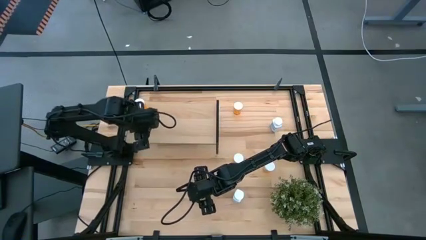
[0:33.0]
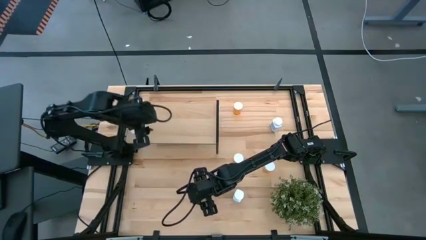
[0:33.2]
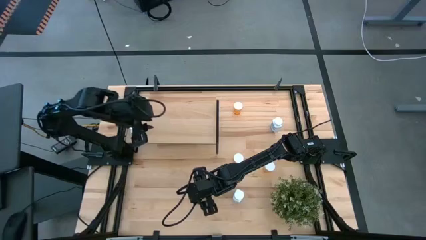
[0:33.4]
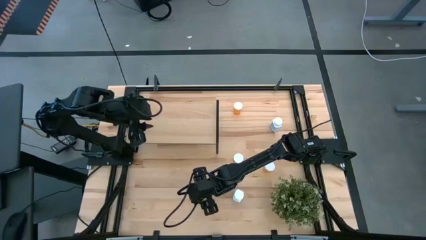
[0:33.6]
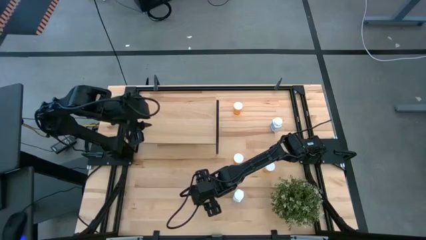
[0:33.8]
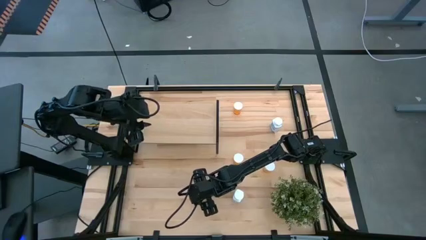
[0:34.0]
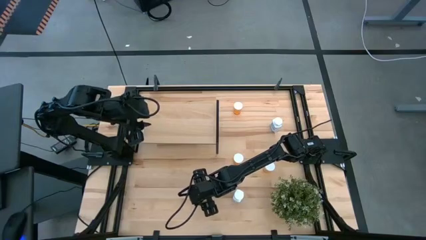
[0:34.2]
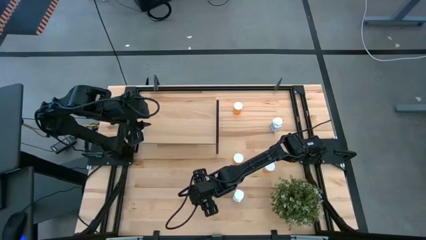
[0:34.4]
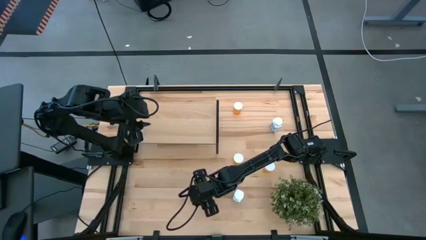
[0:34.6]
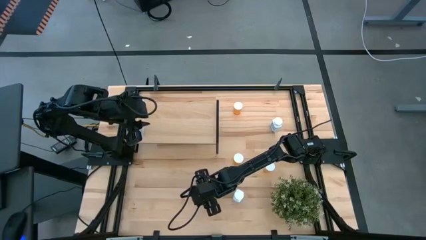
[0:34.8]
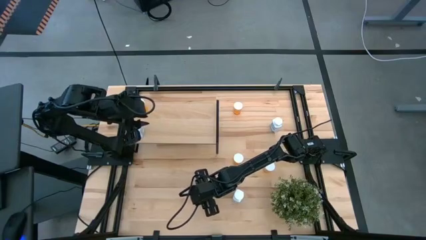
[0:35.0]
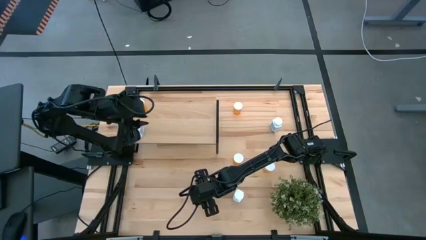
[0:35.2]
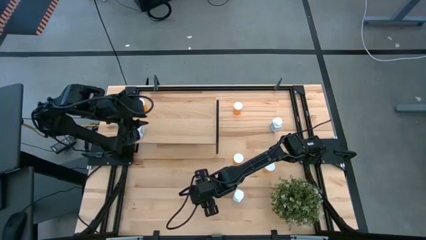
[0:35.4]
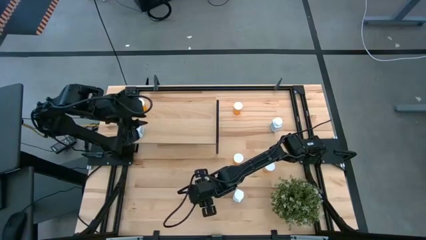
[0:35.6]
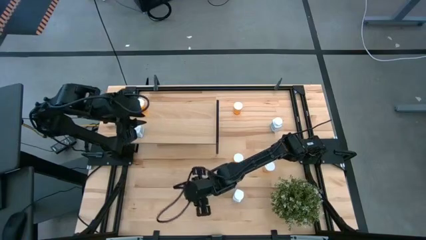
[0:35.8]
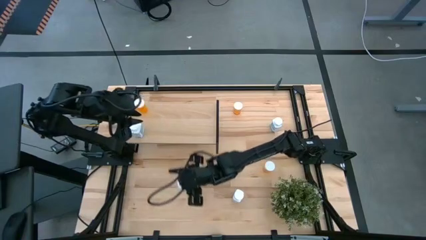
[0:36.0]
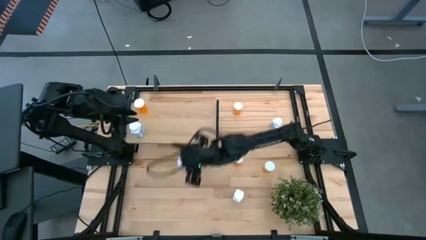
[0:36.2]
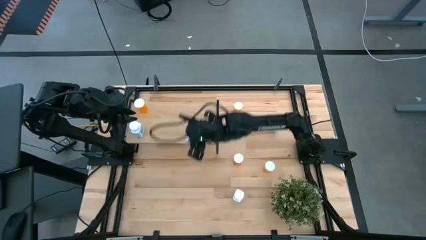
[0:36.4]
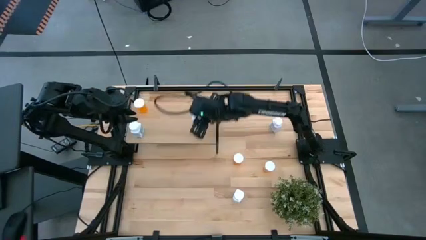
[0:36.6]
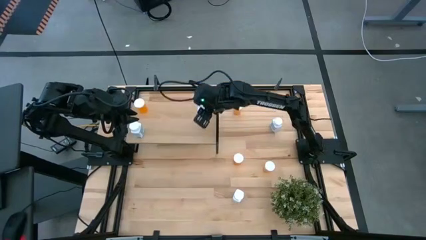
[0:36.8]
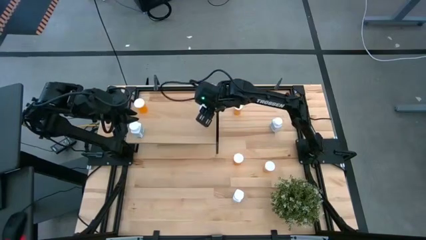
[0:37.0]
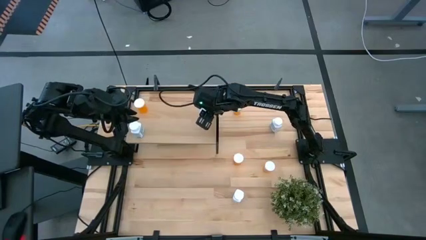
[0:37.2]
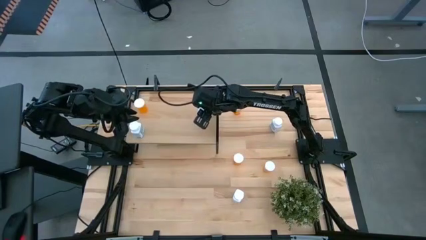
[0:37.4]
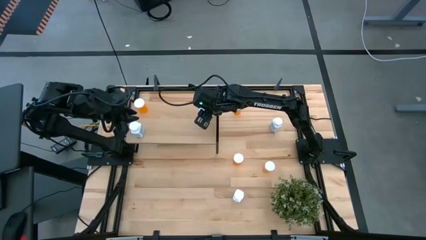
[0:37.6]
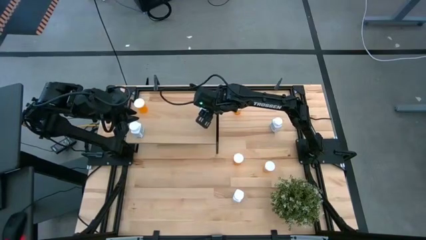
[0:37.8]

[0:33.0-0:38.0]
Task: Pick and place medicine bottles onto shelf by color
Put the white pill bottle on the shelf

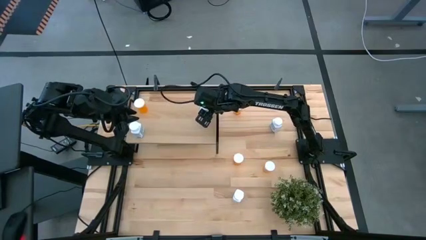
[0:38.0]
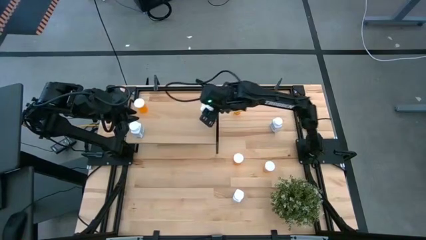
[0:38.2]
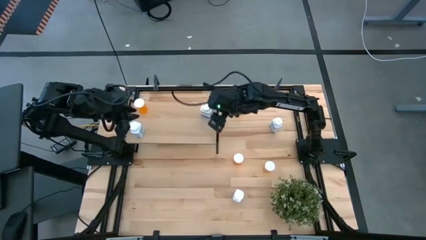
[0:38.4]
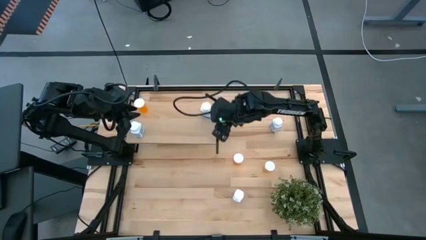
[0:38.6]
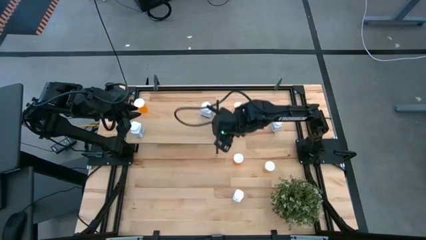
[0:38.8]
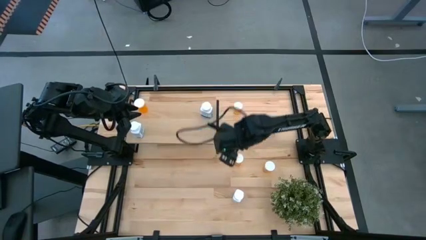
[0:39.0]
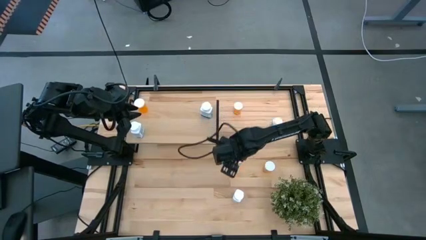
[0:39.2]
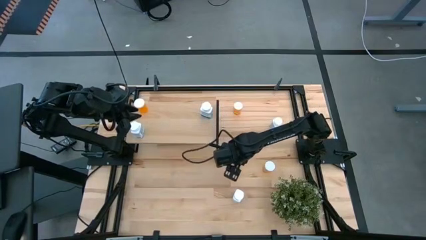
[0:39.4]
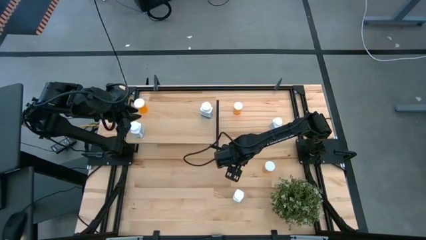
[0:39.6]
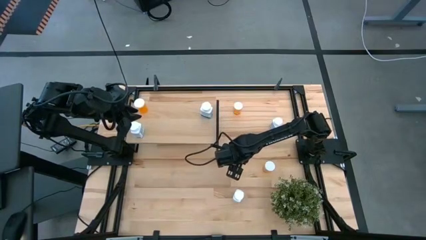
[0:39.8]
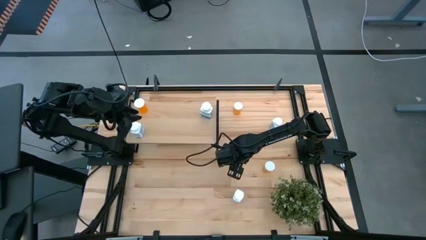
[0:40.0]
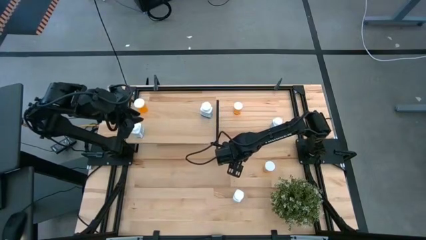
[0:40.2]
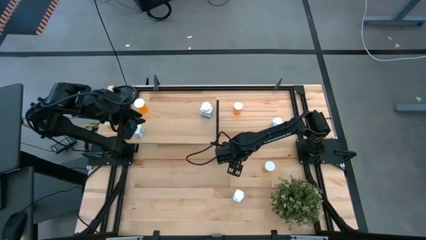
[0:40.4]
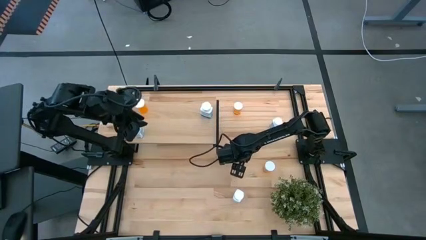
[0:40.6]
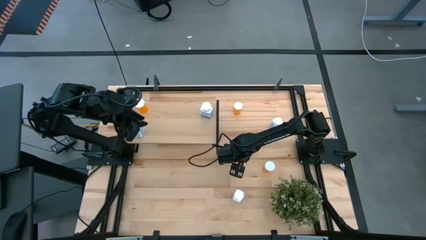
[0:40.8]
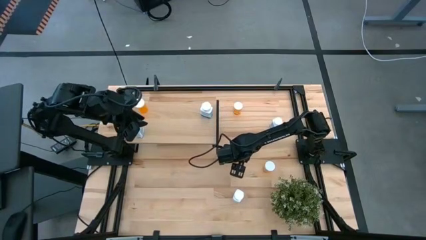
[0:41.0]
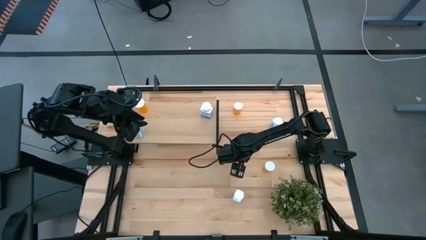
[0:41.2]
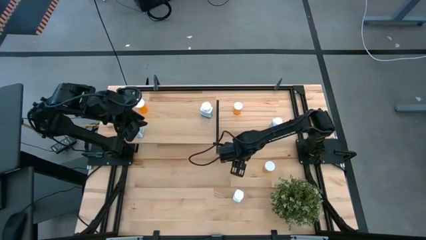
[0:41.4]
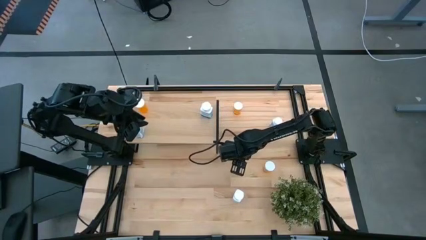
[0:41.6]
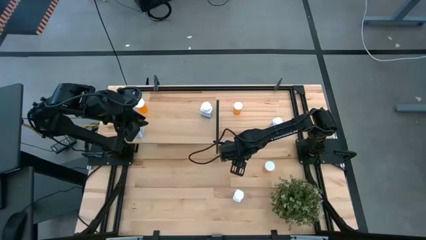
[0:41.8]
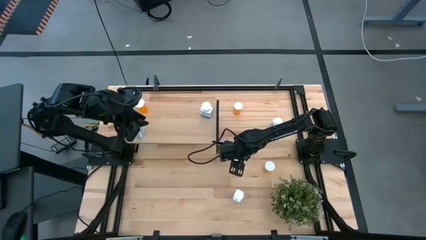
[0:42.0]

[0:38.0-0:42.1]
Put the orange pill bottle on the shelf

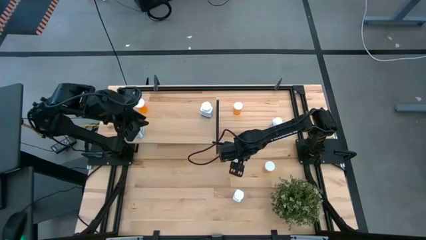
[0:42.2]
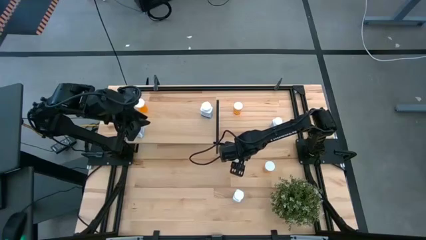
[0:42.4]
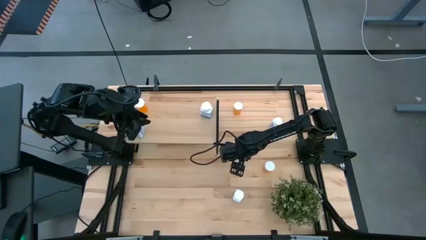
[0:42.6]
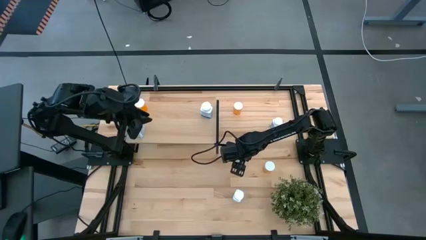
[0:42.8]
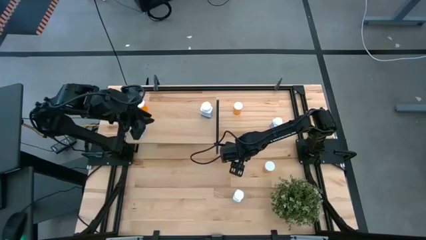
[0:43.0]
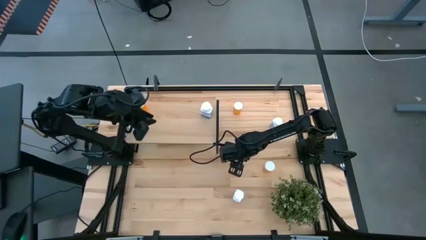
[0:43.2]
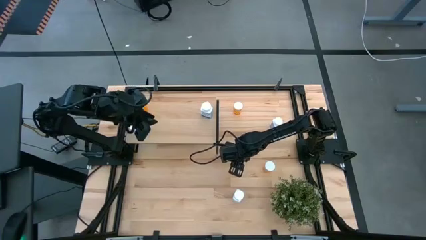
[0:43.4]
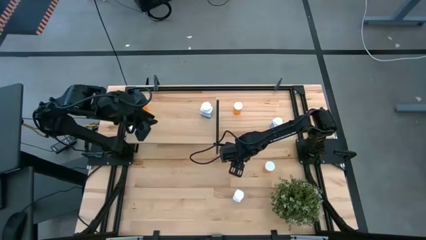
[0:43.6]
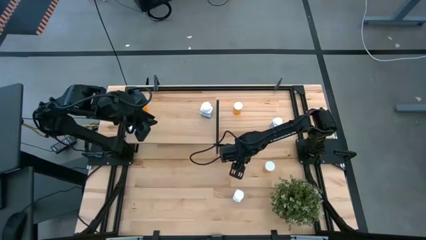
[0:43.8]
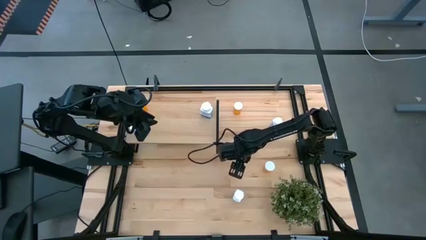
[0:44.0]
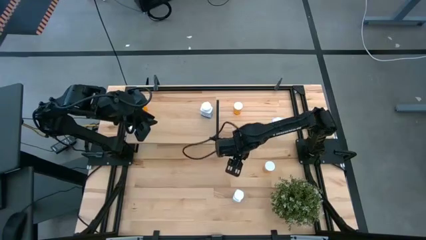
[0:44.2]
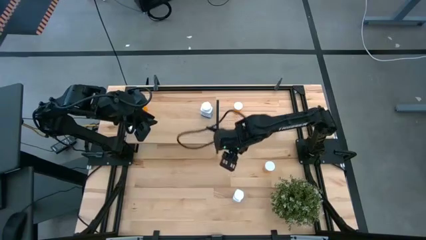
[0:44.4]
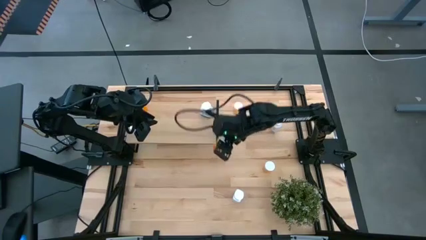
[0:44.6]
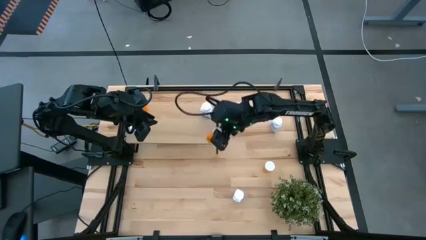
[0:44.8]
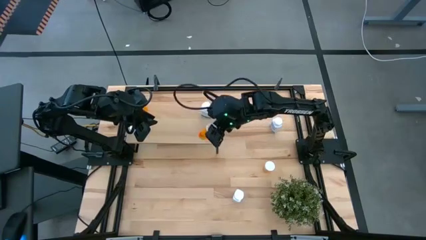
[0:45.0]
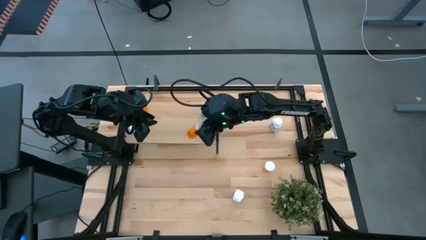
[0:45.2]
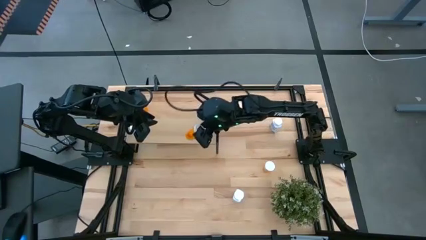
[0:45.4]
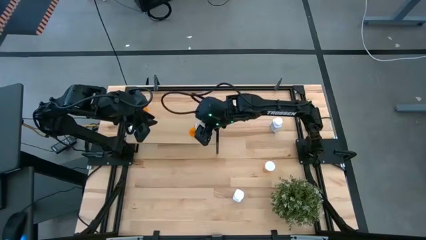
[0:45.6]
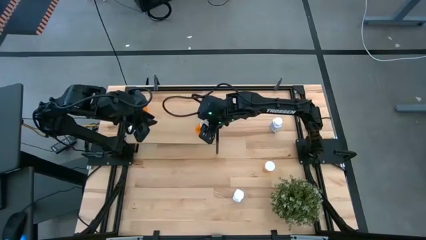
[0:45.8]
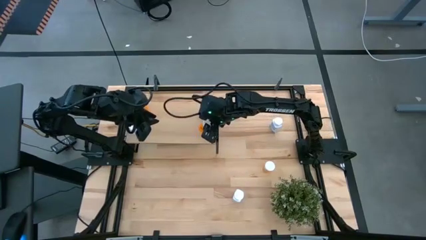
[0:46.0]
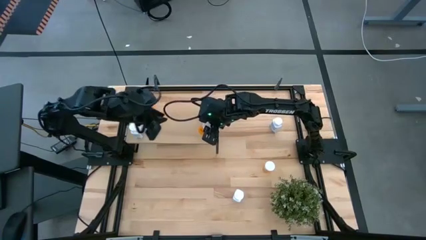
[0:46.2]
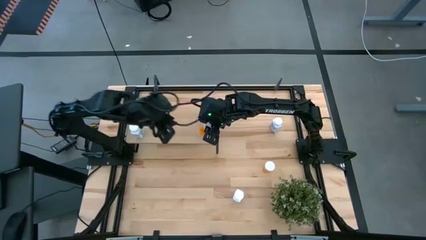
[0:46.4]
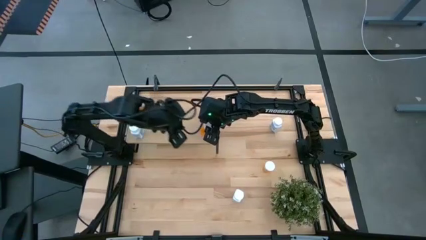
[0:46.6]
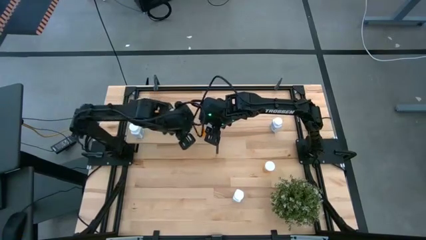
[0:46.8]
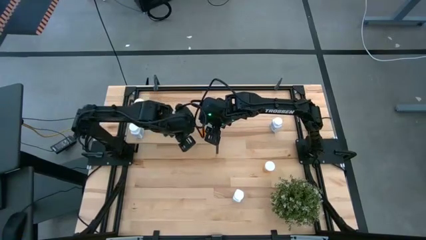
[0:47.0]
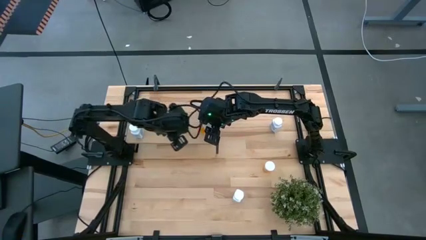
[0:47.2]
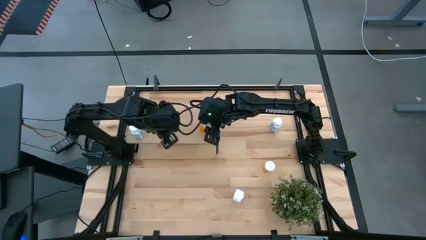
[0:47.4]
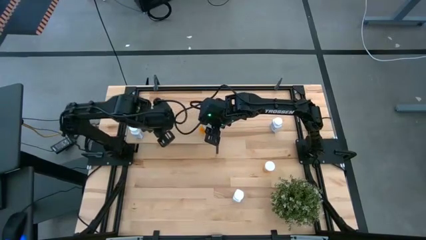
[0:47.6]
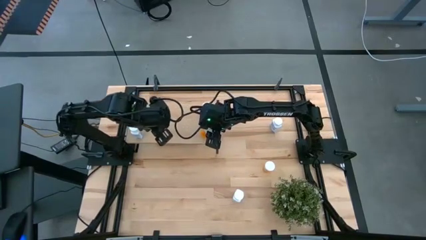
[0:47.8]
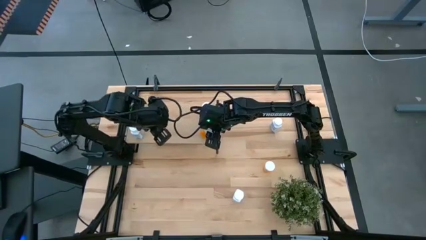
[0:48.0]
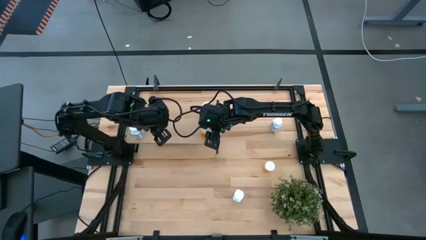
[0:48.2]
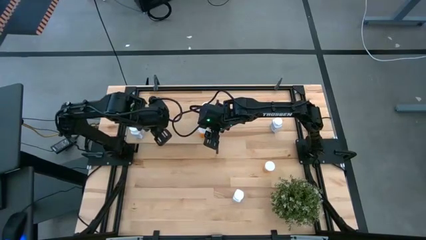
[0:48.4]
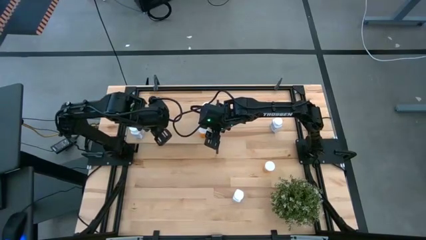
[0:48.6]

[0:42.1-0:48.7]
Put the orange pill bottle on the shelf
